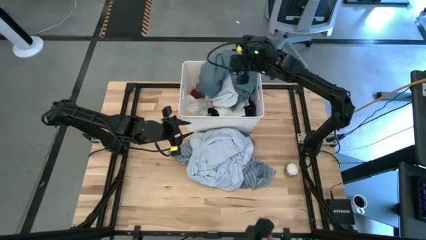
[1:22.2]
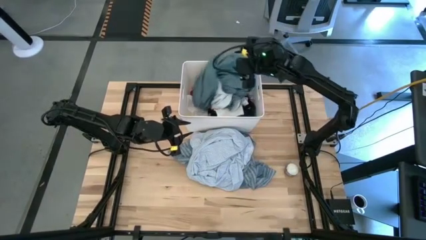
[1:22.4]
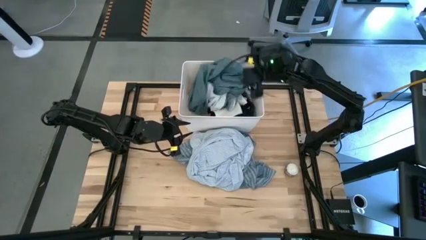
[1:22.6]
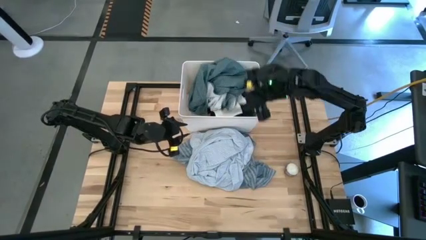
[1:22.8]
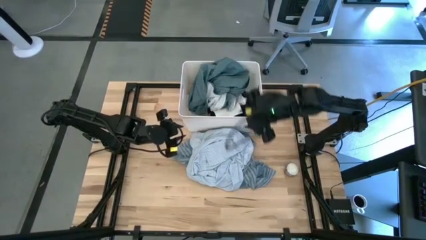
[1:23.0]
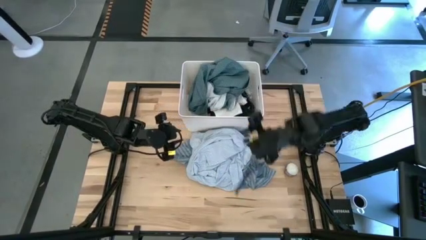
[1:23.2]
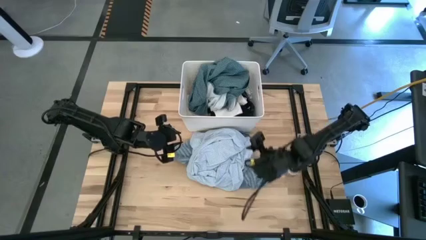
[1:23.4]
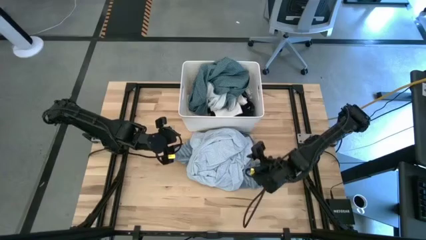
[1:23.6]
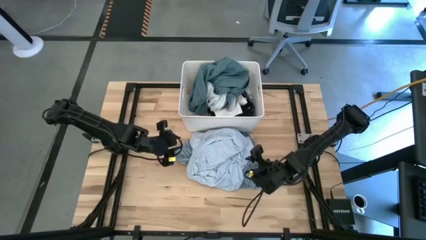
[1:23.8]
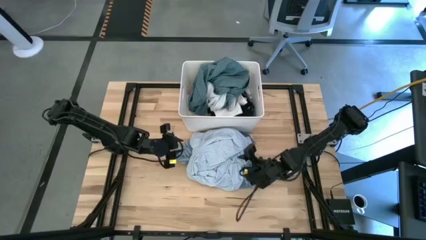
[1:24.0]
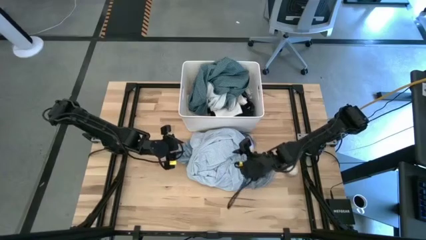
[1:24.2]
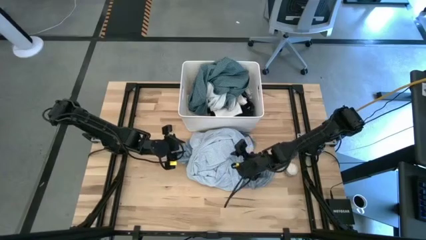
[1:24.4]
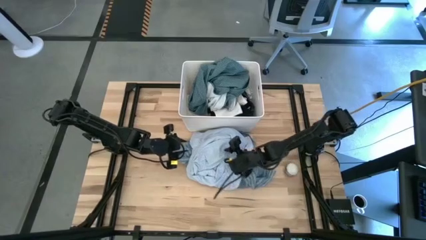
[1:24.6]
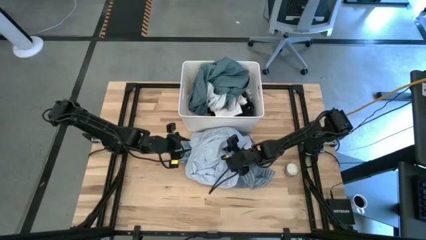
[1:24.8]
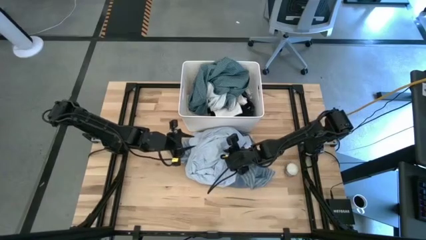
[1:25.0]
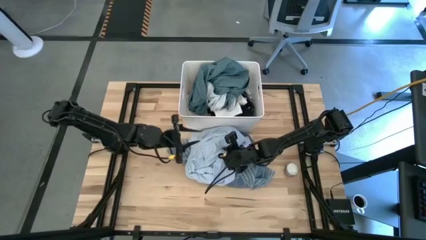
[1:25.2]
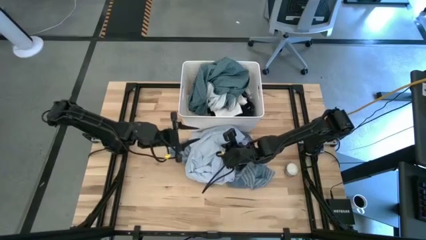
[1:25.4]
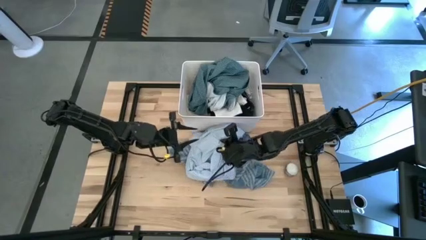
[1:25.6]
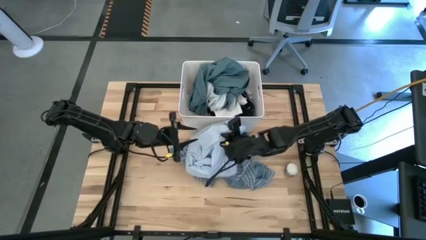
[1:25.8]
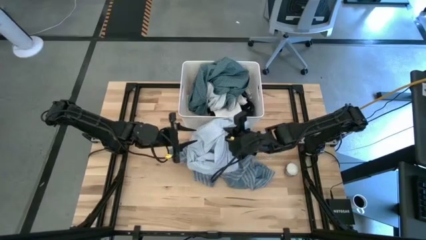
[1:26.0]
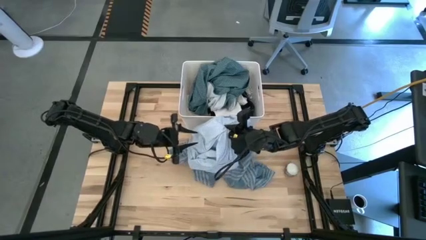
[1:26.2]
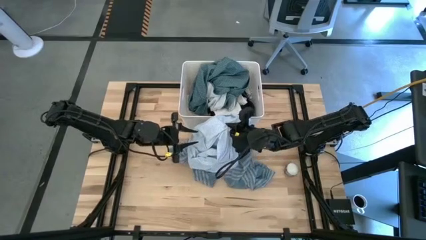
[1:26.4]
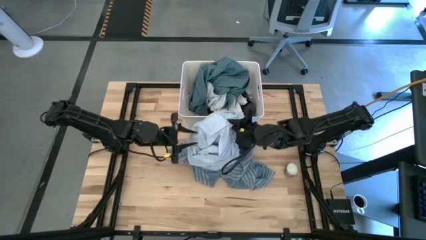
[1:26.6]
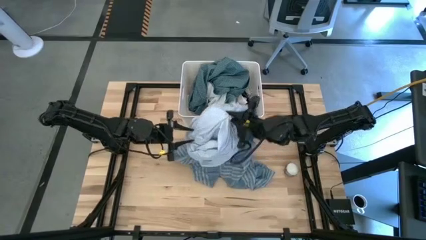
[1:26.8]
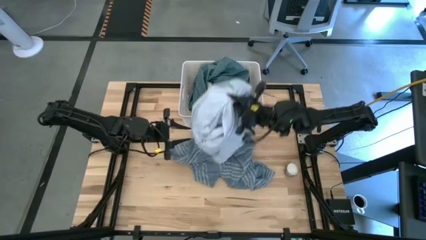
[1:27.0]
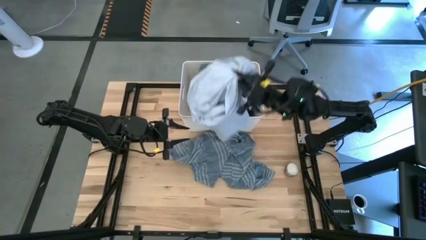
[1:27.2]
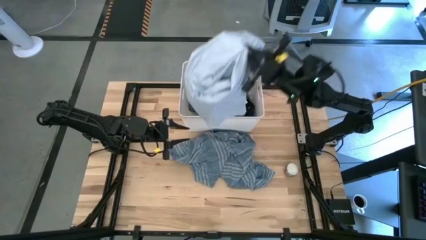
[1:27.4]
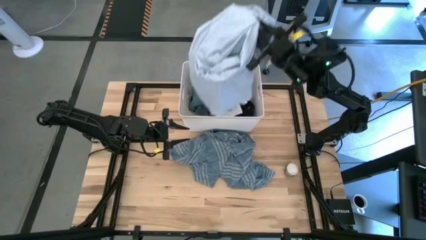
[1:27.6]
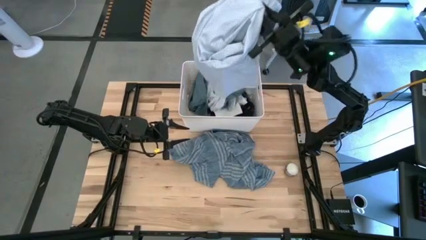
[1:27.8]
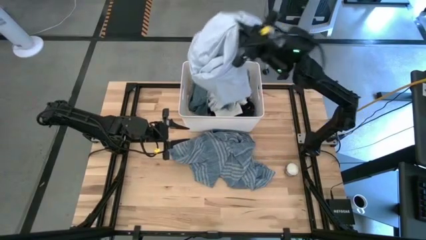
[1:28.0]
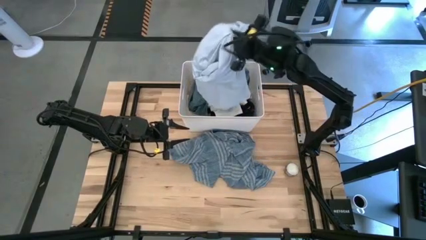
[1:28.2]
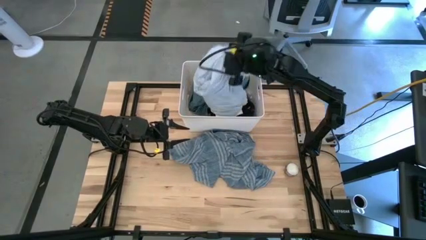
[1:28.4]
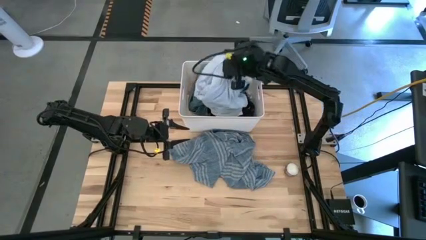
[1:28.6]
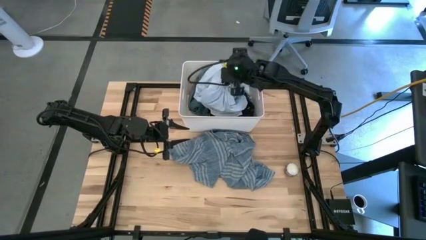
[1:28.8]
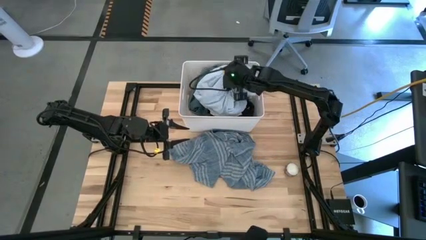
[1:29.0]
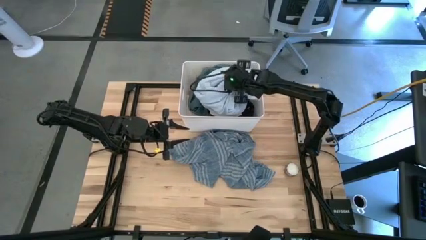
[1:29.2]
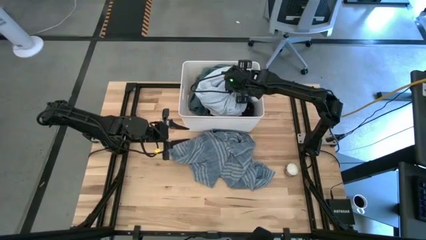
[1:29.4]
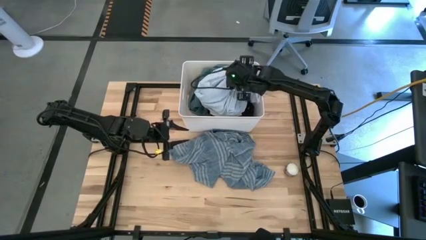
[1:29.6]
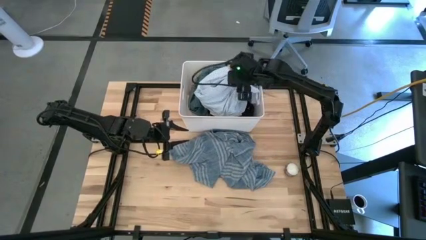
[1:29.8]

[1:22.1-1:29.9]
Task: Sort clothes
Put the white pattern shirt into the white bin

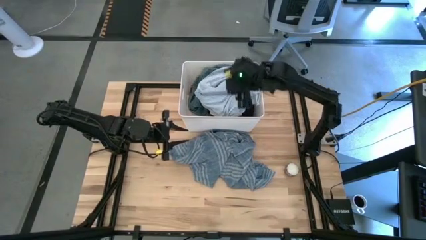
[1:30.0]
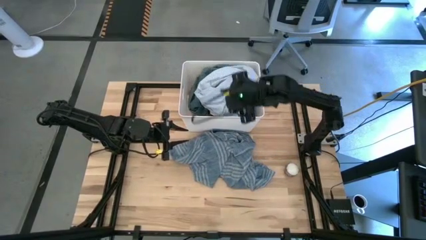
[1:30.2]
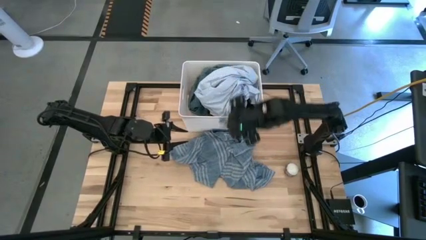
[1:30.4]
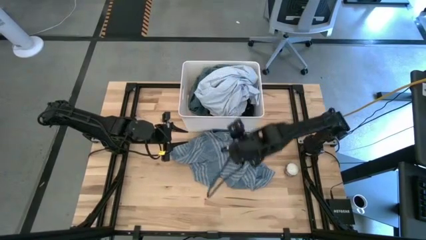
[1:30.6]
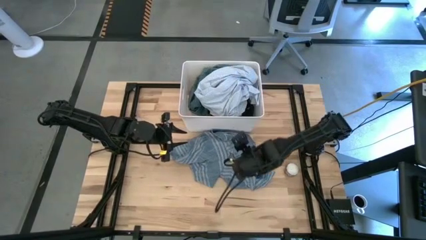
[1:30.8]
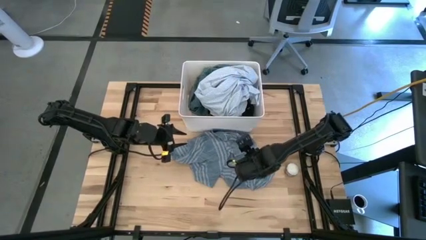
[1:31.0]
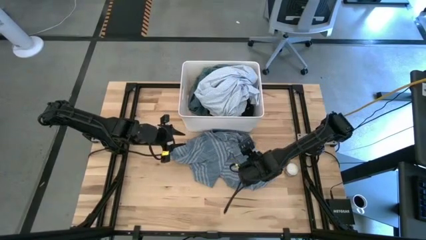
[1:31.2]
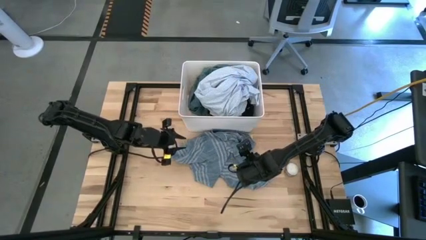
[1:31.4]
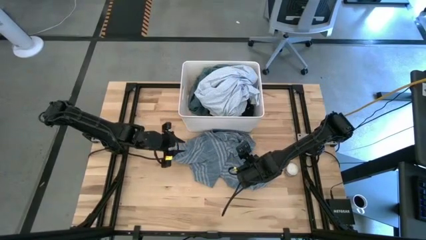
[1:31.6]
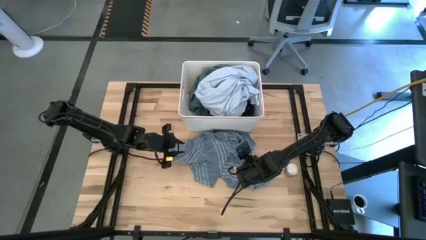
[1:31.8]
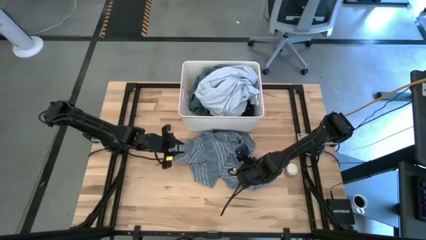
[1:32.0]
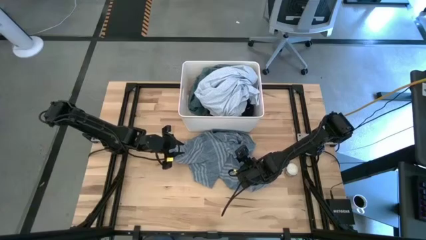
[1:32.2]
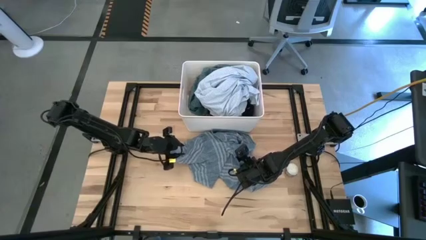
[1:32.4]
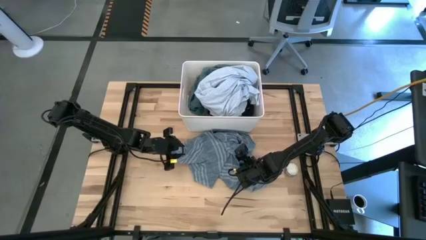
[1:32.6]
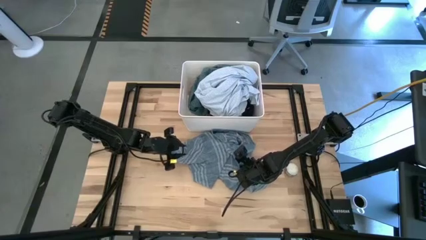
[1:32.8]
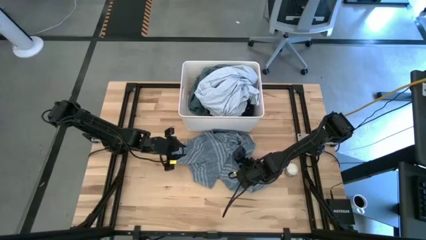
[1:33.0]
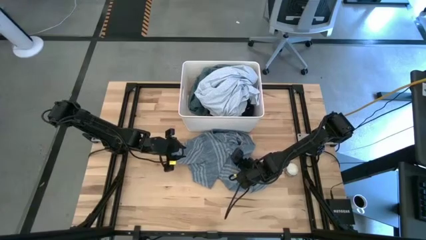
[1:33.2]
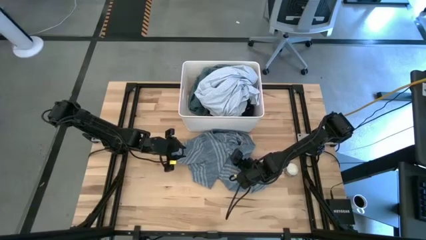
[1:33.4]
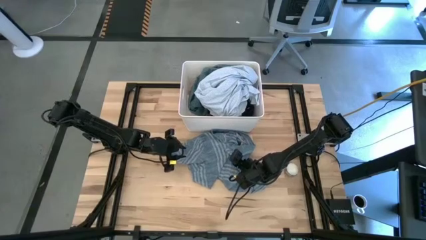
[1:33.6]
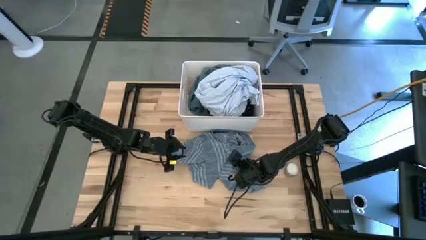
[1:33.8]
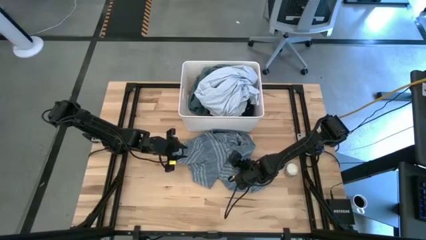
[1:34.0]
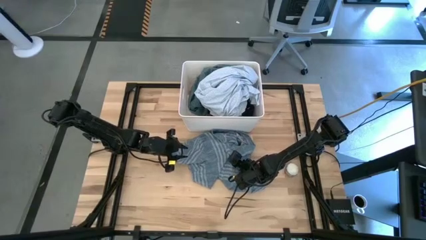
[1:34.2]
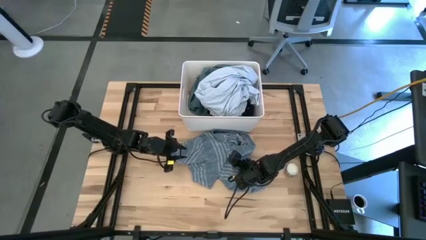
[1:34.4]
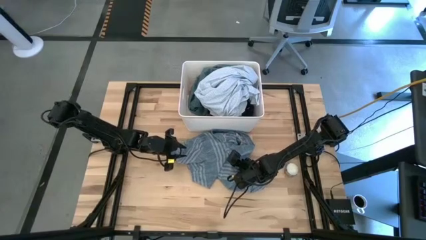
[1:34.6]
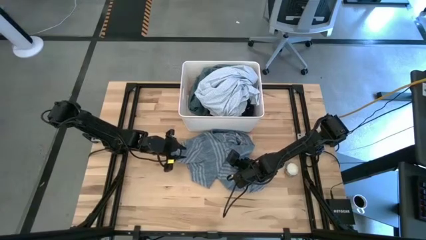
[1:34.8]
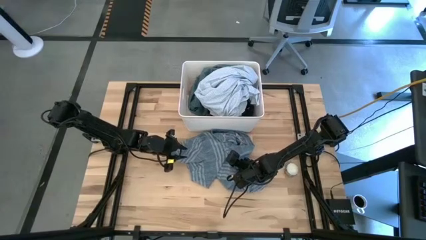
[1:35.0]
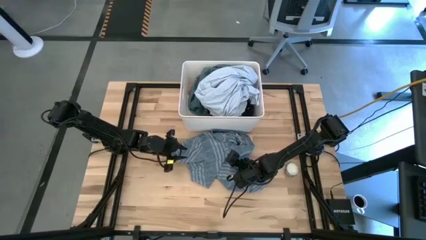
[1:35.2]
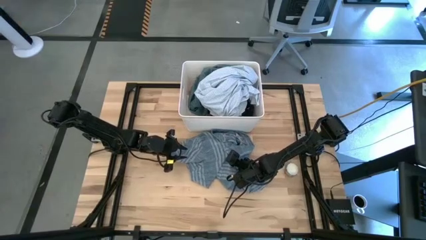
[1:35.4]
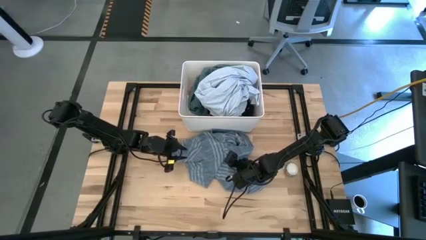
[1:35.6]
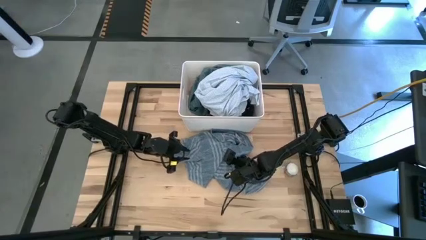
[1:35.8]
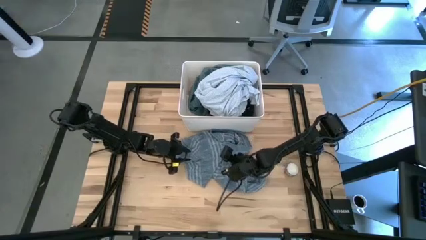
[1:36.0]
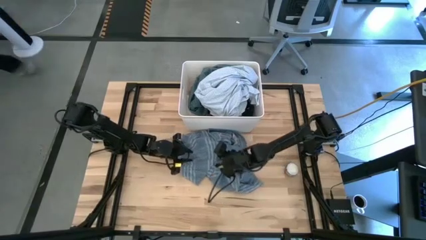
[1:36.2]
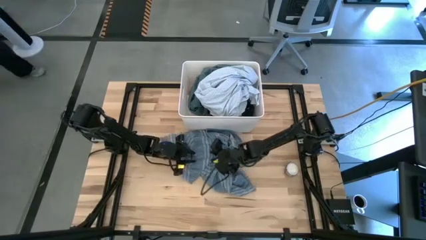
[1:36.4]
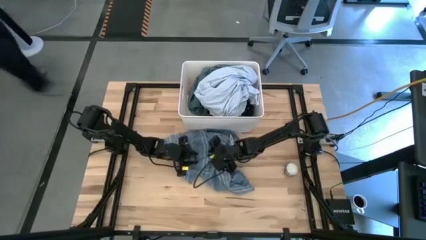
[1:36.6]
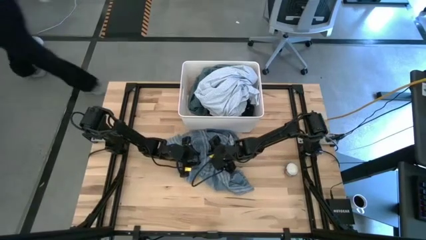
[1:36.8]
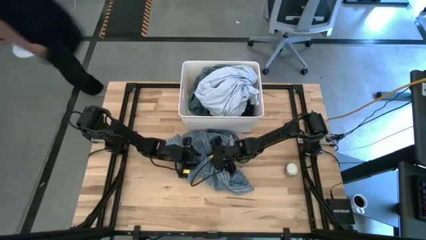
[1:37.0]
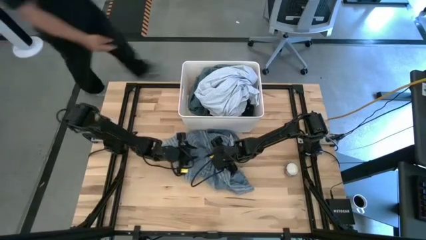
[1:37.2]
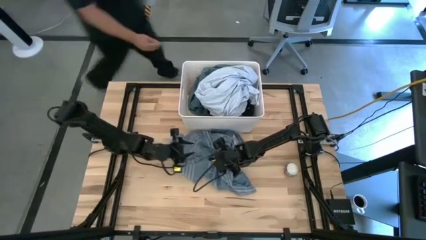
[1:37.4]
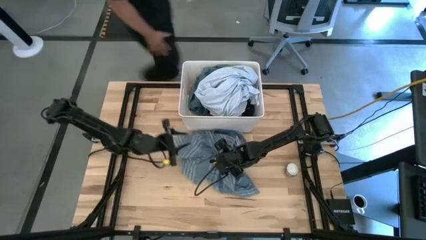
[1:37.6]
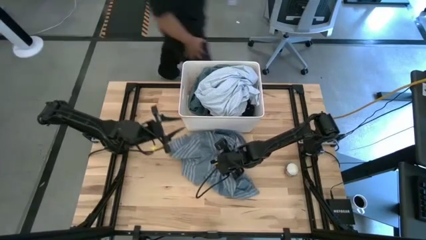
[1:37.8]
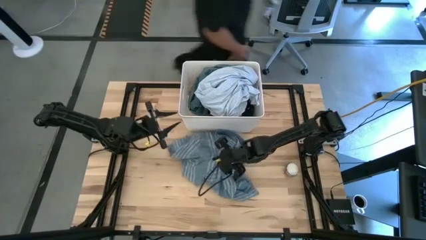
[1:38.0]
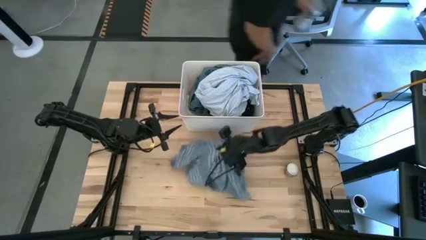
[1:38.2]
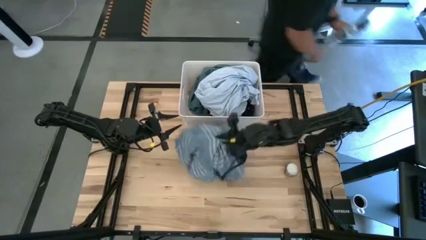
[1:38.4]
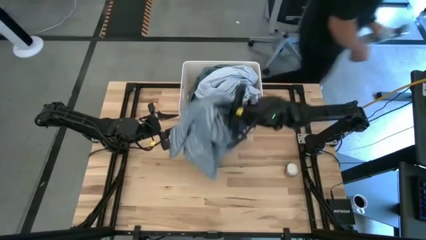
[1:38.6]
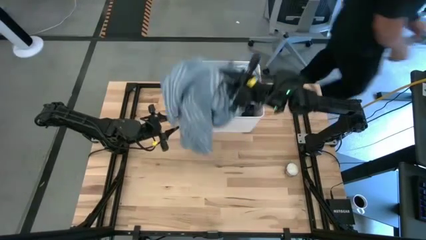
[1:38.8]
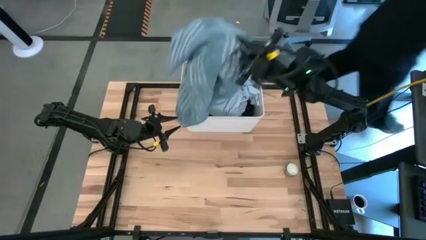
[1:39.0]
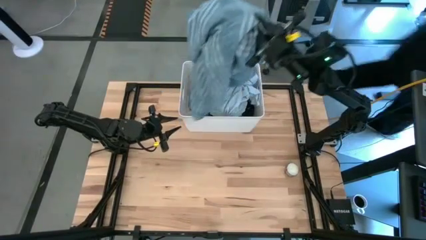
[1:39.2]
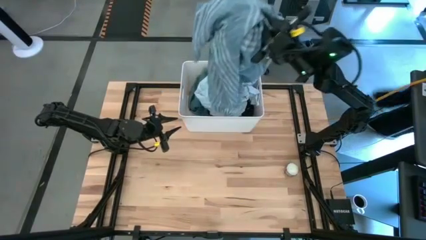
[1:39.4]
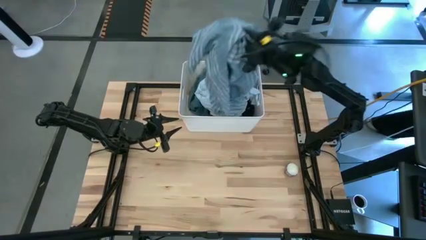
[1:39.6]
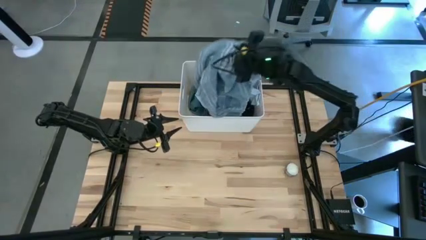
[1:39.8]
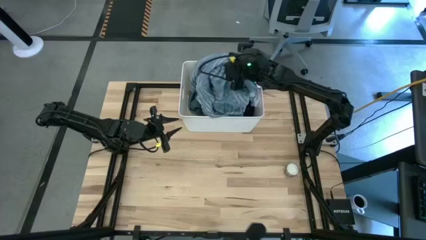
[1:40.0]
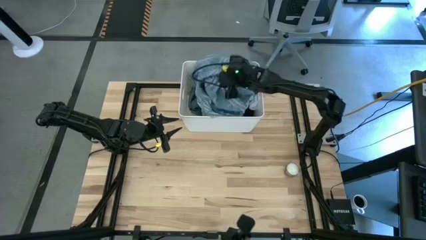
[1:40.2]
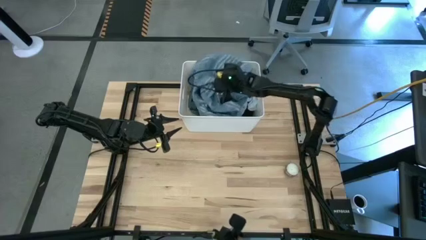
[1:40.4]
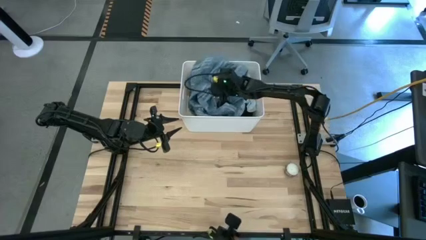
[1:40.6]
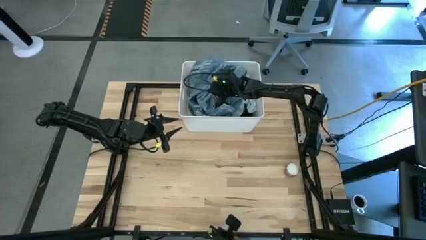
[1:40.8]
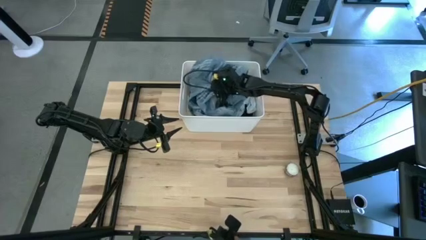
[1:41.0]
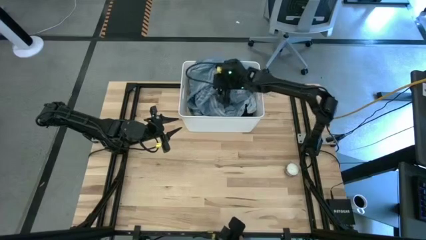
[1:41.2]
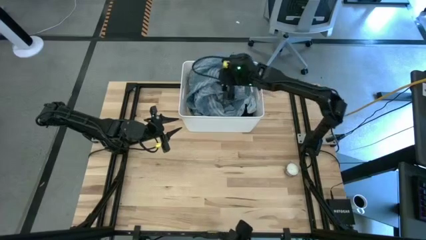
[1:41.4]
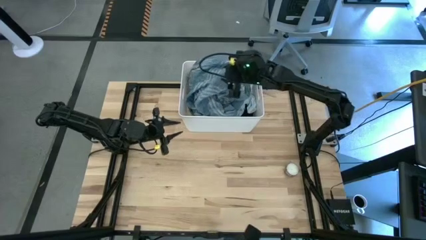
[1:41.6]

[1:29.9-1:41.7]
Put the blue shirt into the white bin
